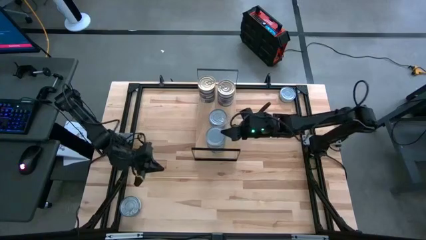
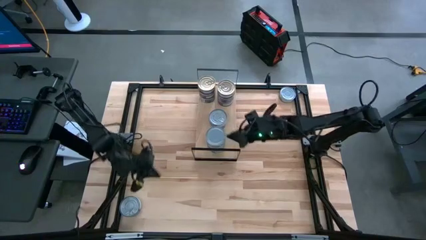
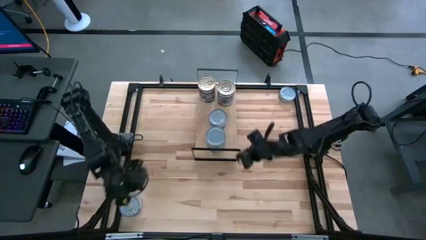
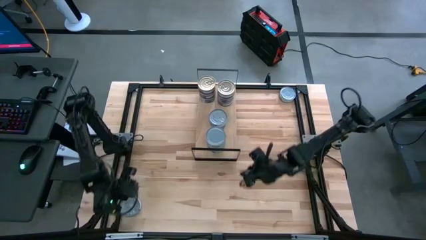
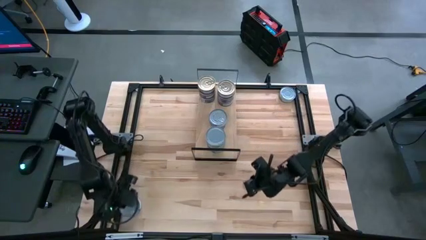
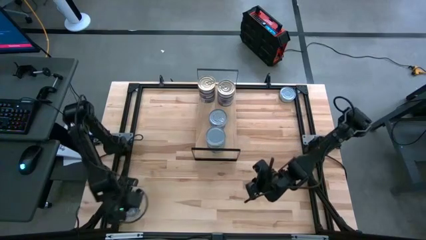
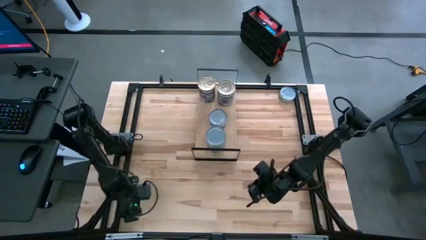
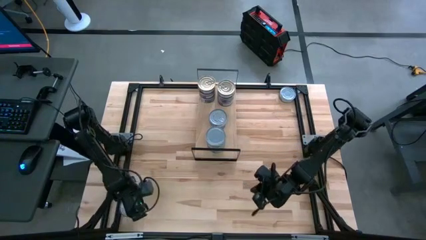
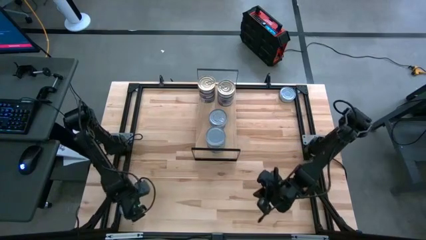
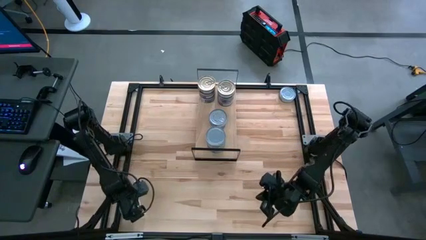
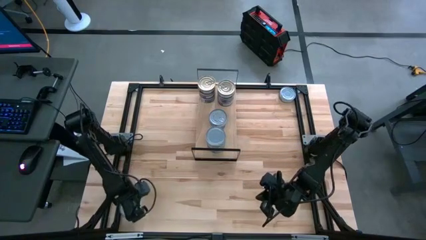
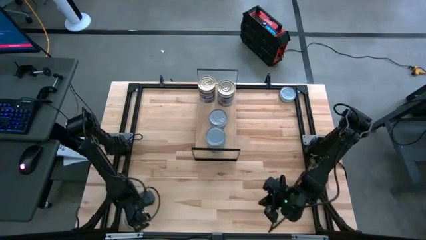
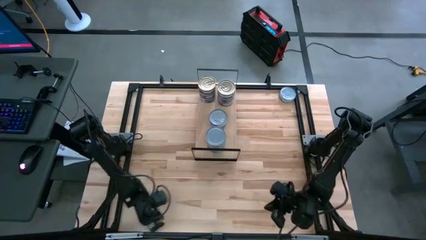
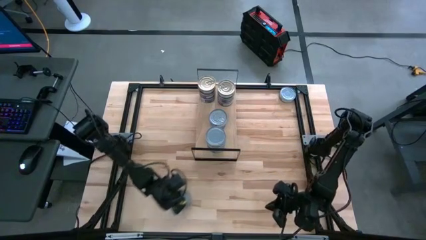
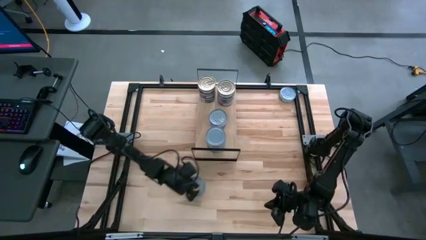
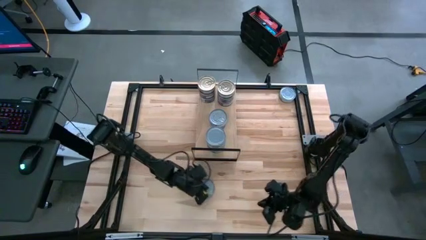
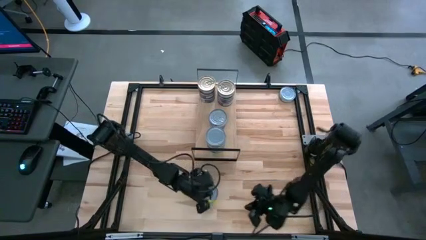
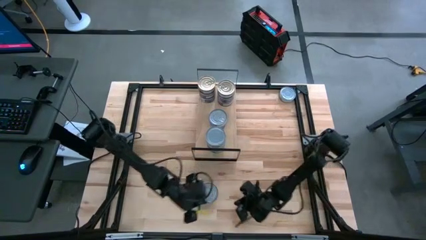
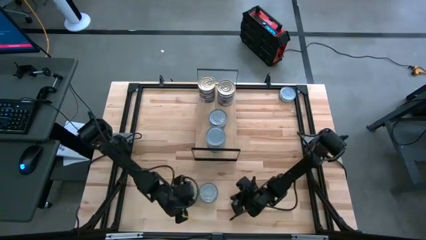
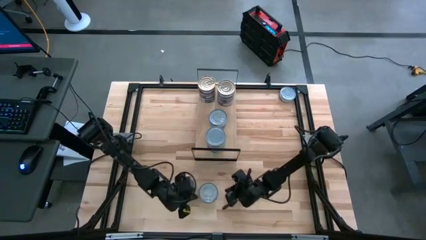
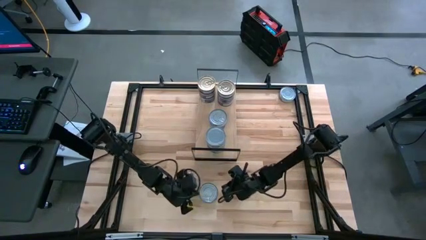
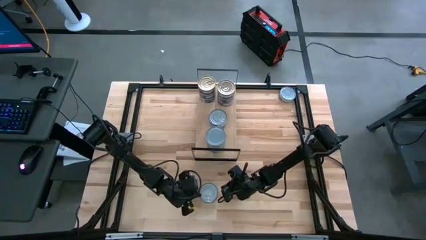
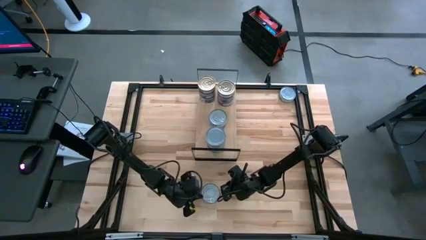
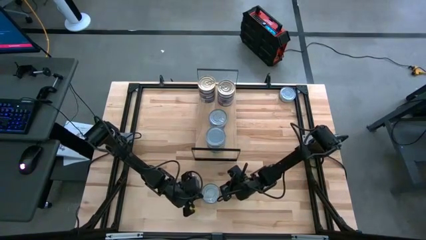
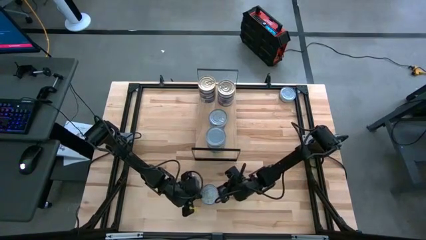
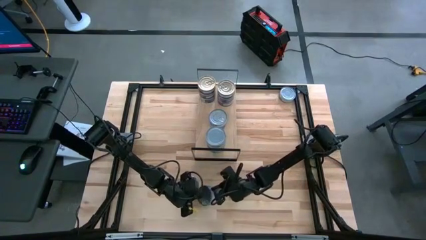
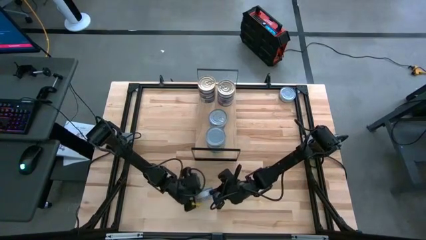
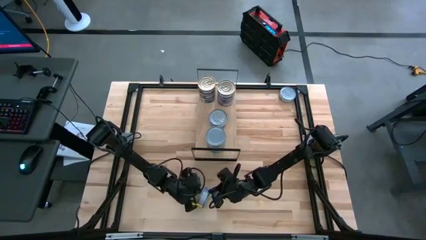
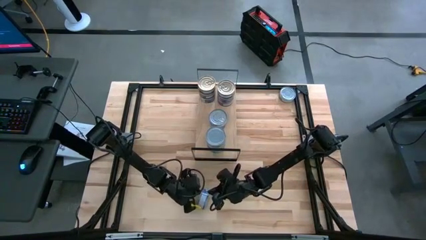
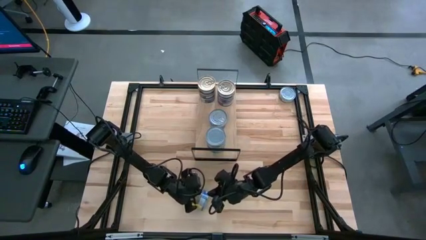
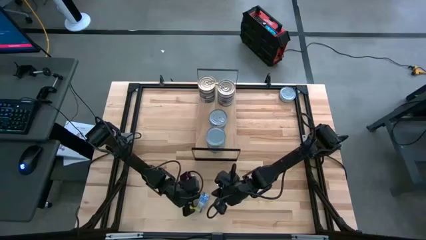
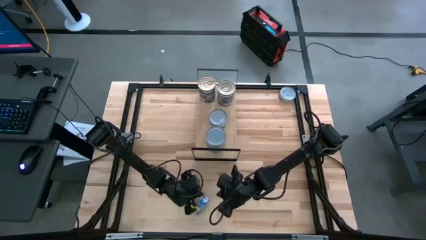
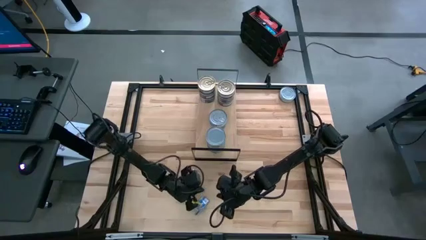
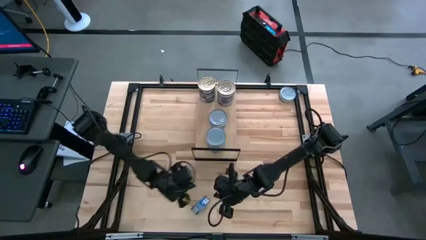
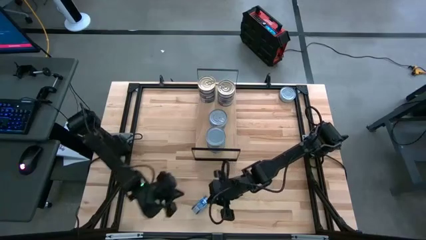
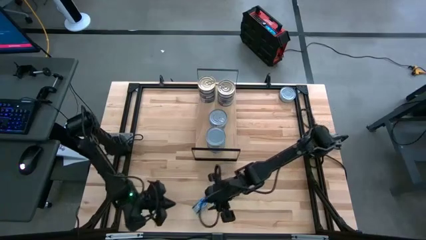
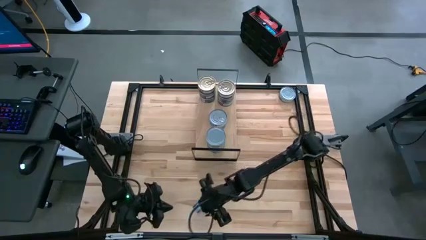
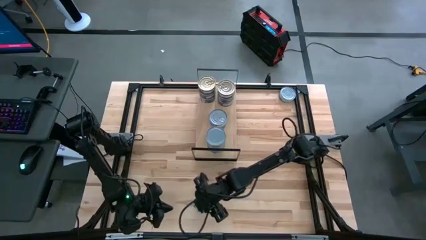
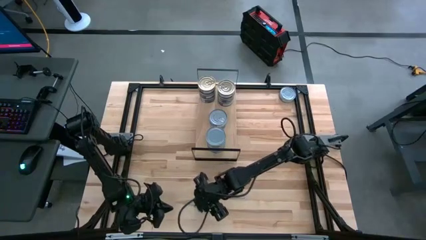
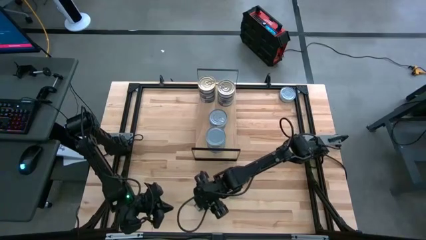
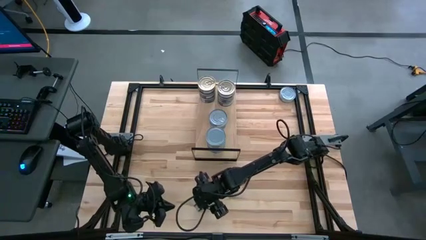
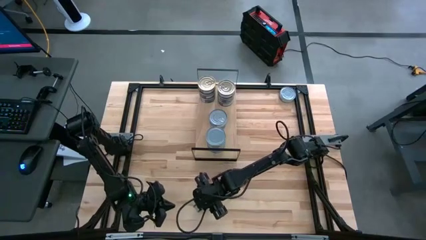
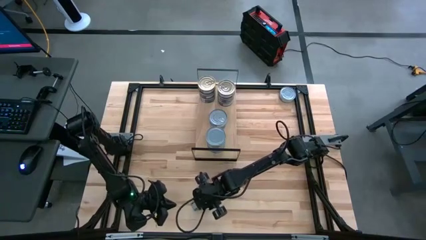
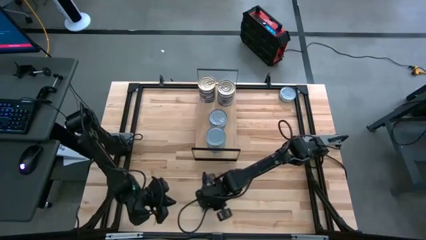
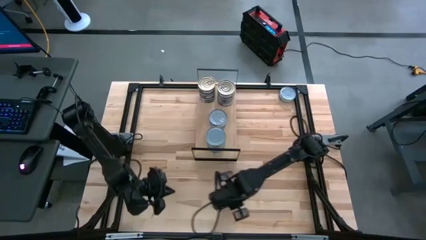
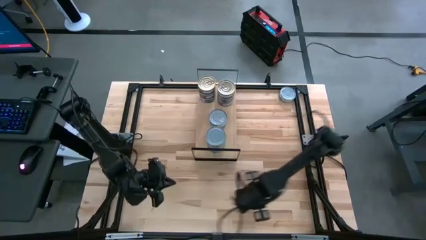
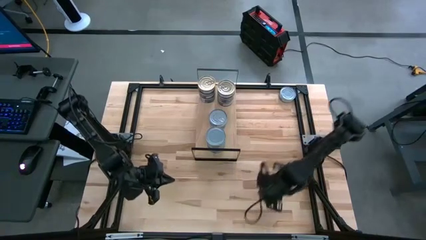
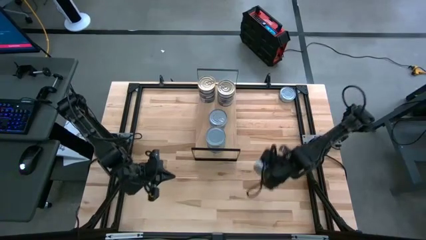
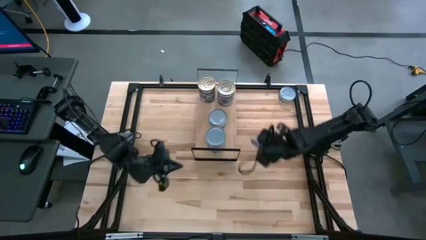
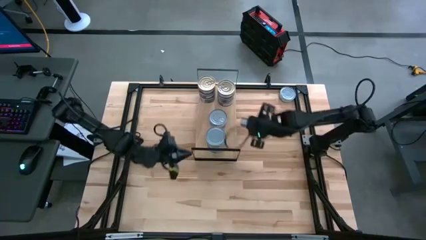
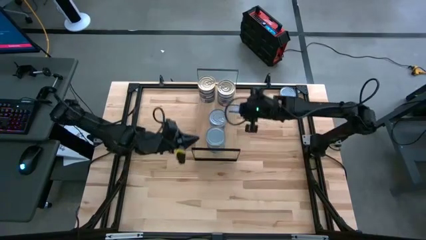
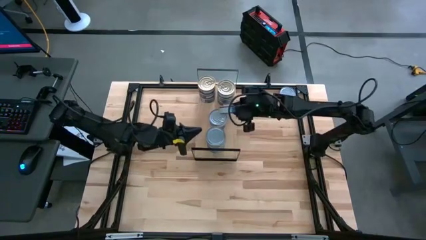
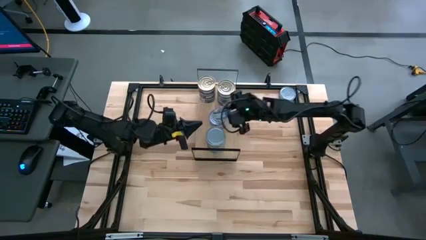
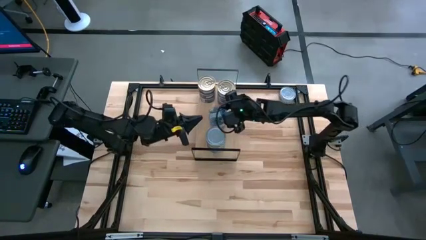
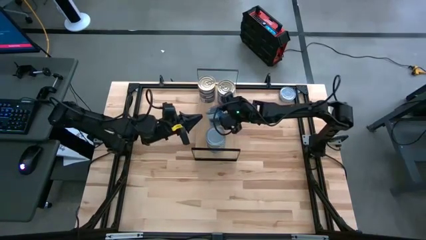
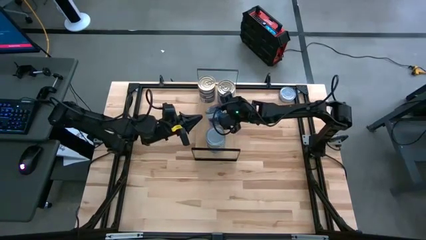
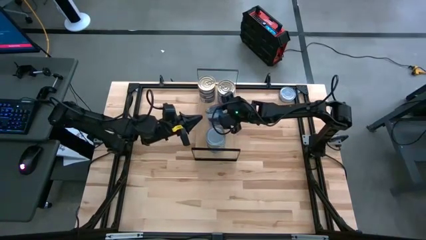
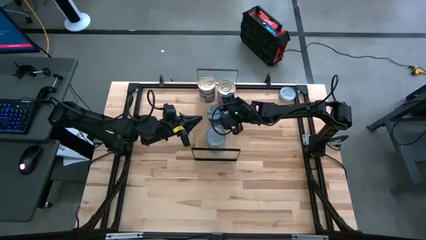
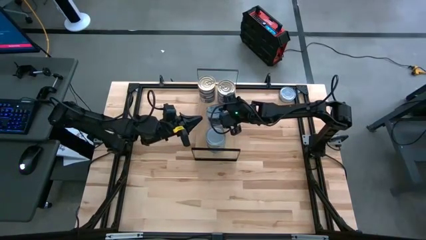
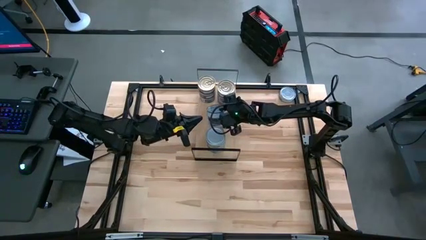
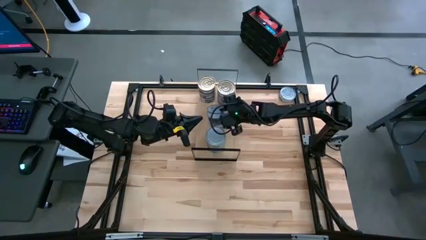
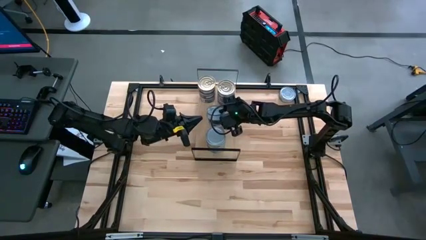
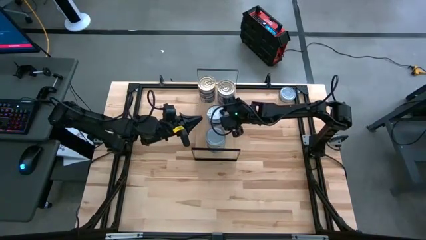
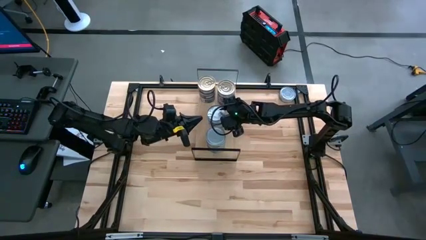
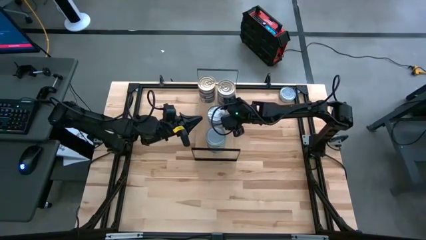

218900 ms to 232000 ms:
Task: Stack canned seafood by type on shelf
Stack the blue tuna can on top of the other blue tuna cans on the shelf
